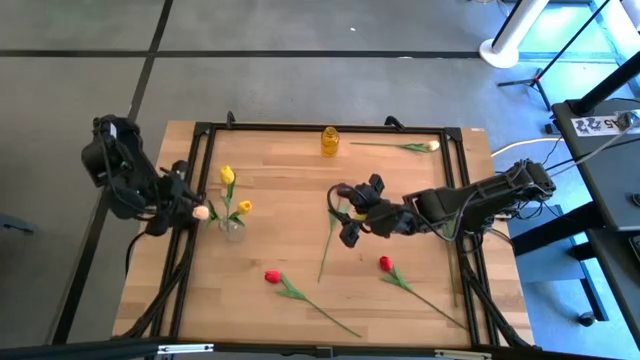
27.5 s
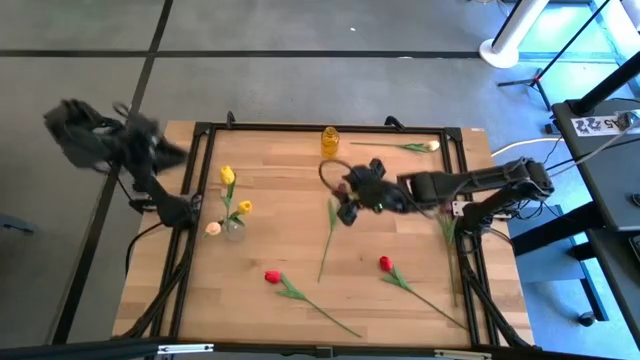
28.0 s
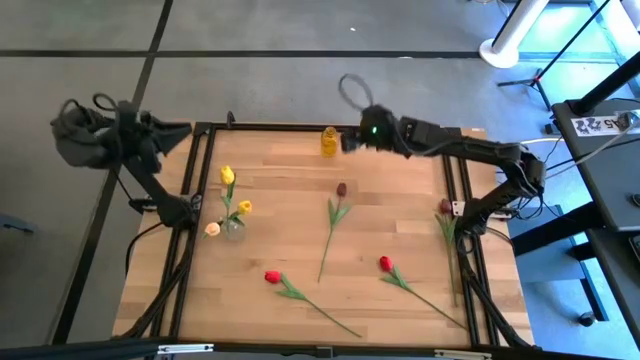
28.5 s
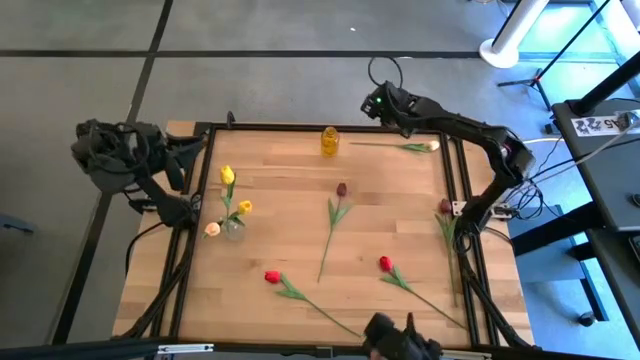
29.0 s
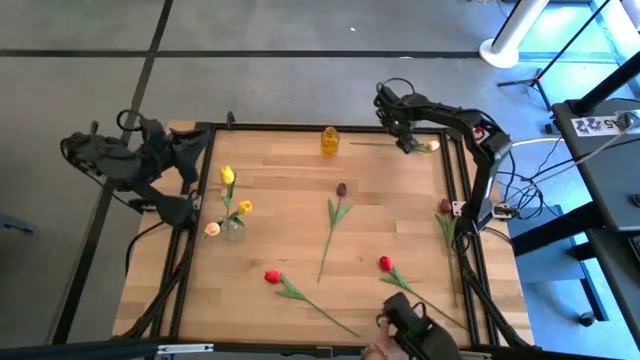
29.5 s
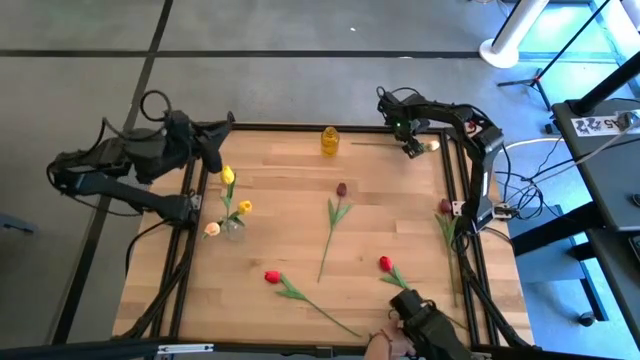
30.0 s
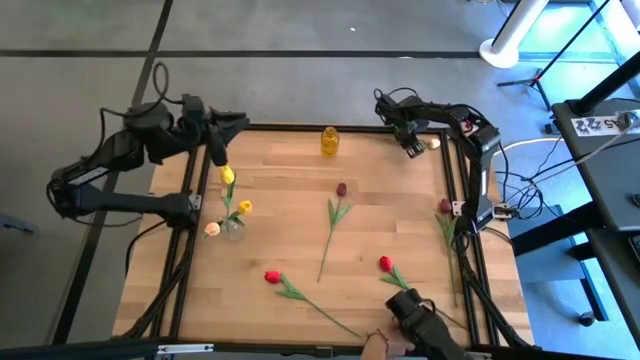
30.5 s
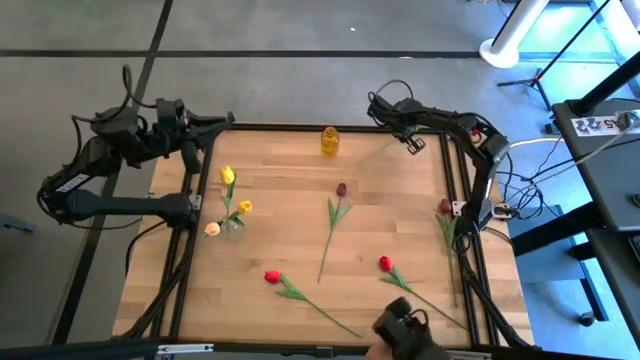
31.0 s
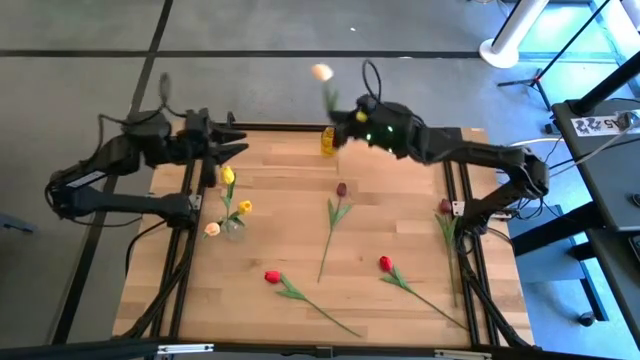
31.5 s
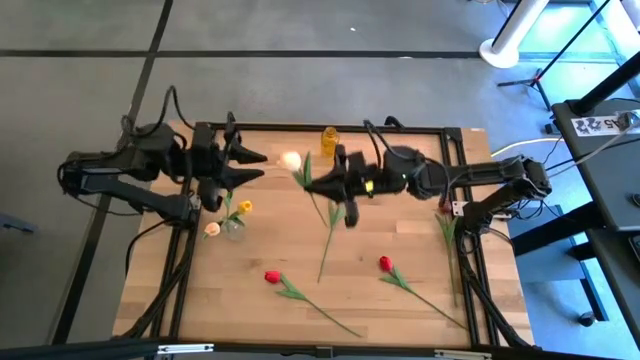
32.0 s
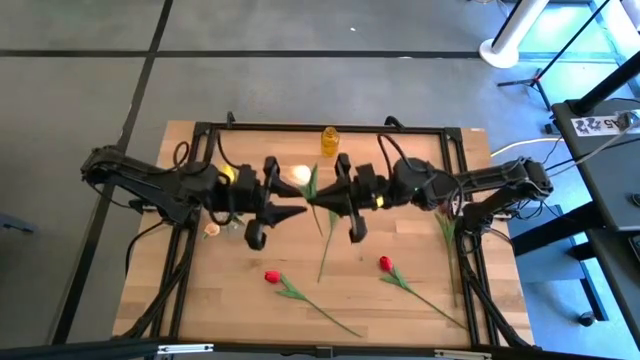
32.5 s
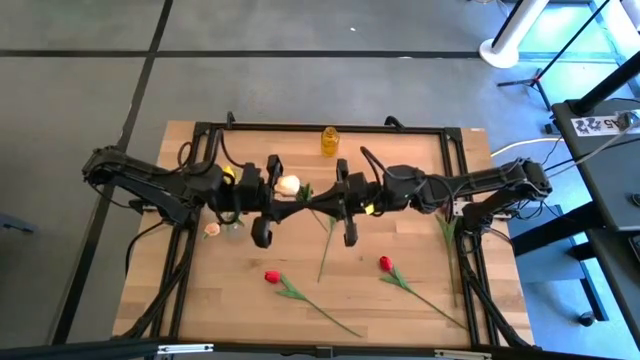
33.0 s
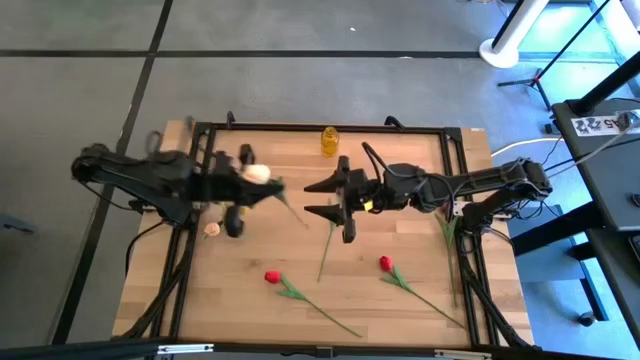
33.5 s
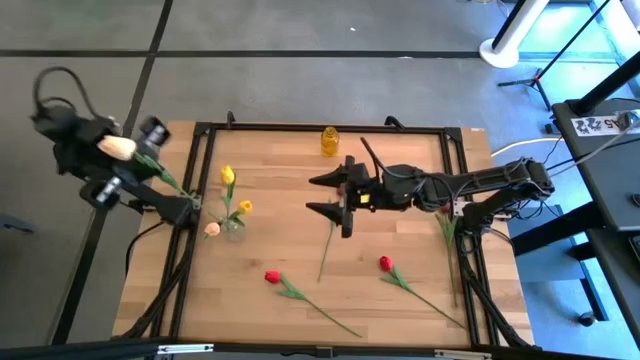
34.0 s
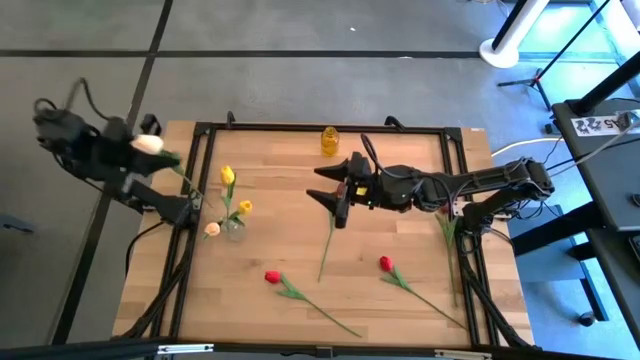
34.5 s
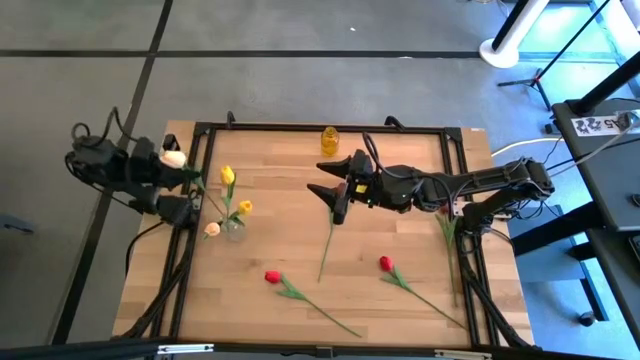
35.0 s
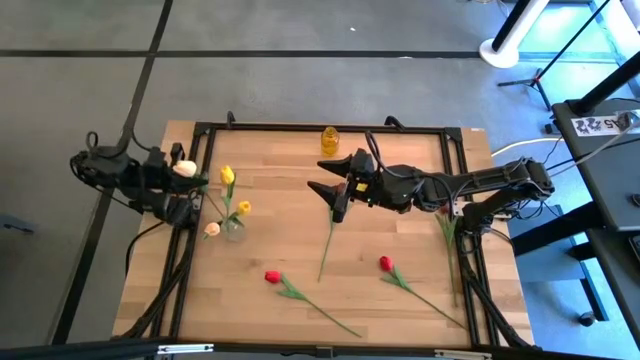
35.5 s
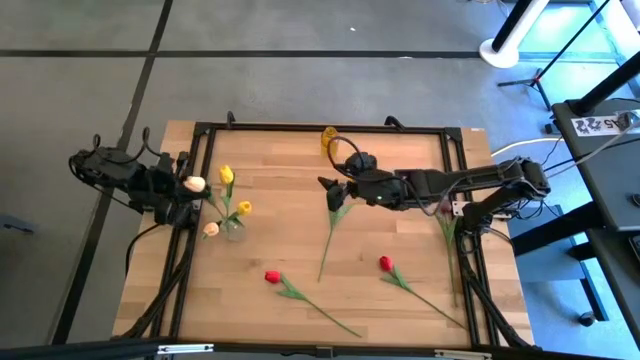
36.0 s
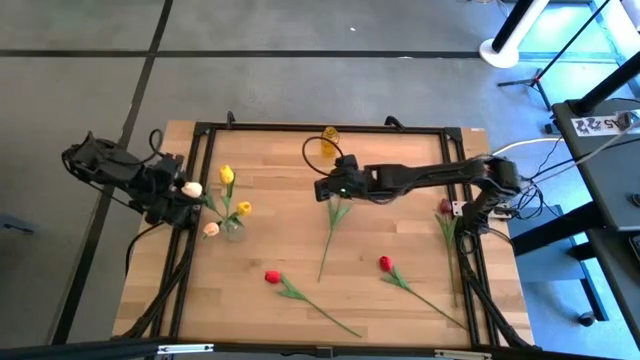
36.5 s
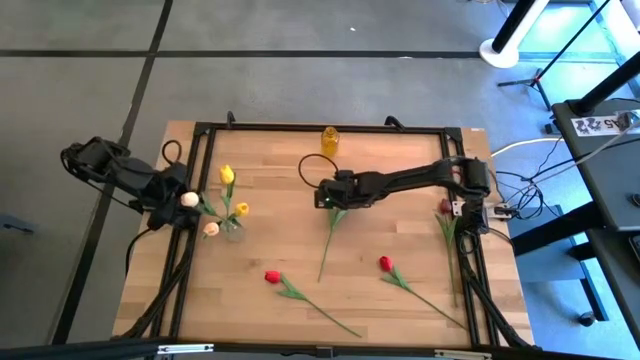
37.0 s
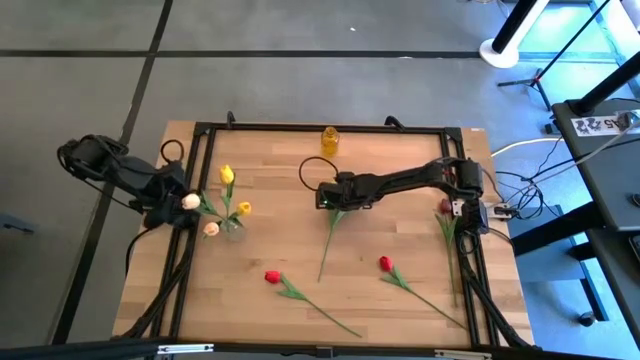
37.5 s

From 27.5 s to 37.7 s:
Task: Sort flowers into vase by color
Put the white flower into the transparent vase

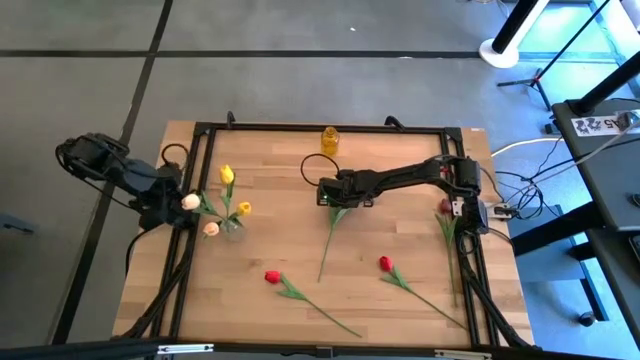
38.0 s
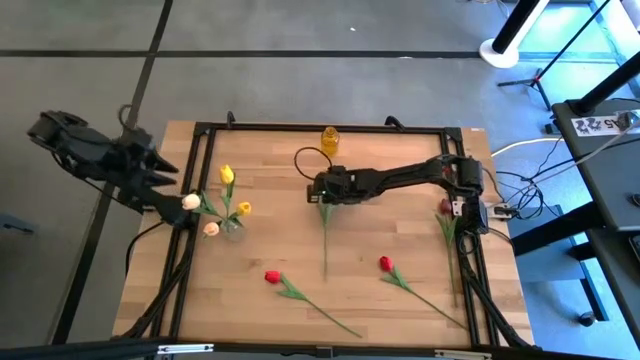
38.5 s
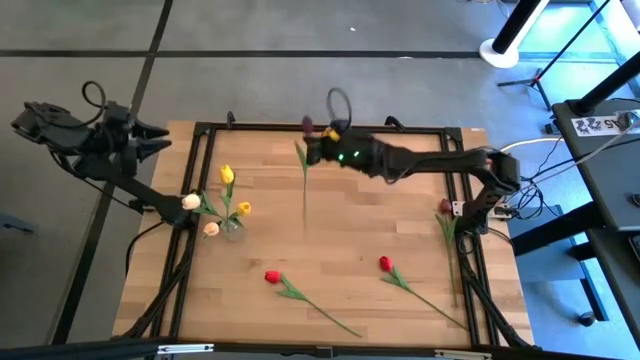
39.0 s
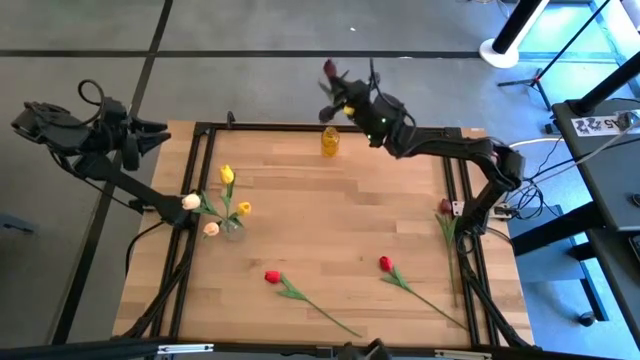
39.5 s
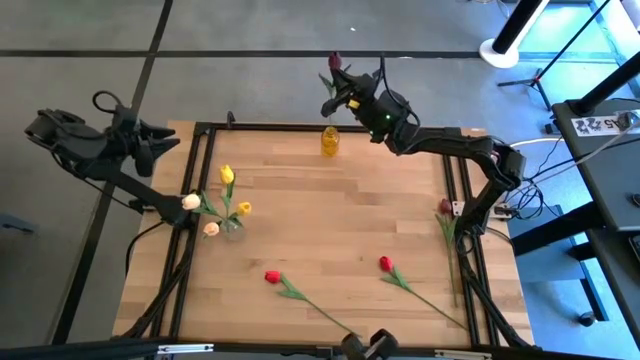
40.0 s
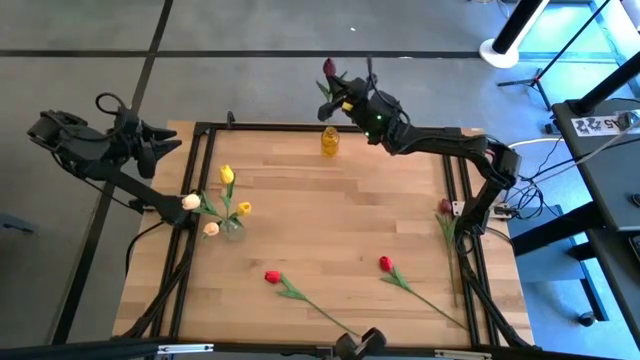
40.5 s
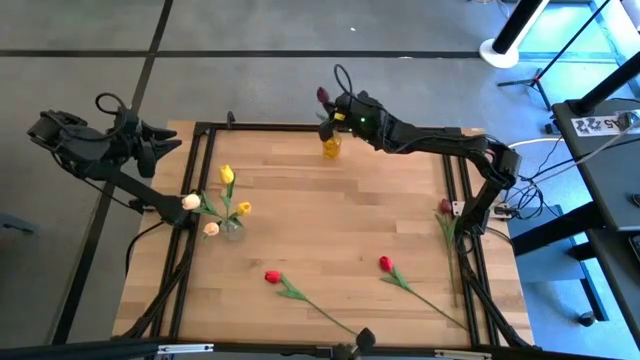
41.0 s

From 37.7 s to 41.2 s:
Put the left dark red flower into the yellow vase

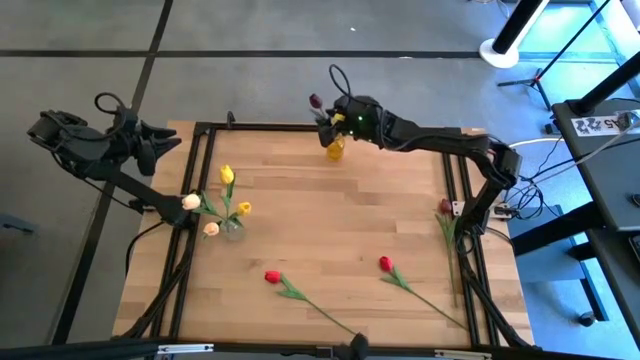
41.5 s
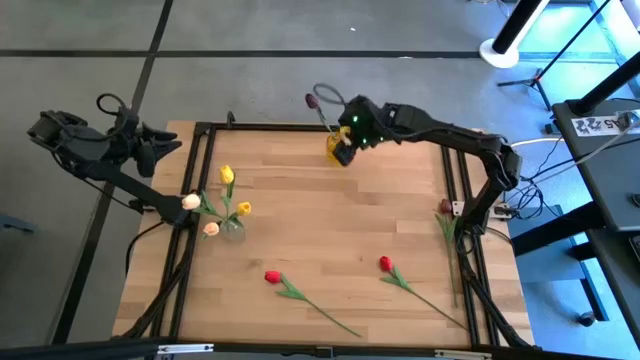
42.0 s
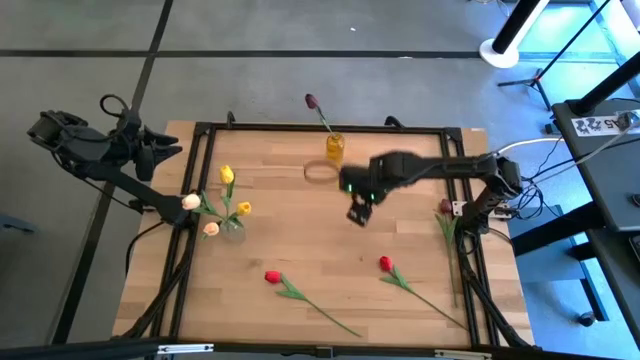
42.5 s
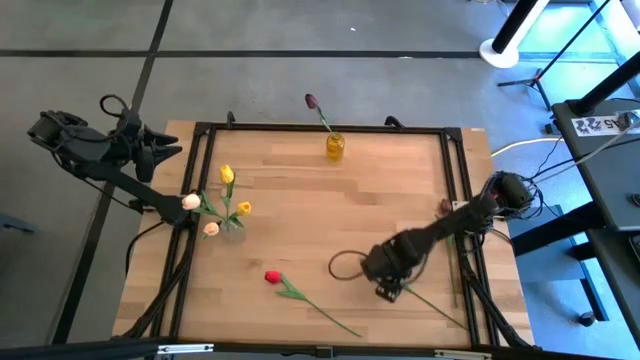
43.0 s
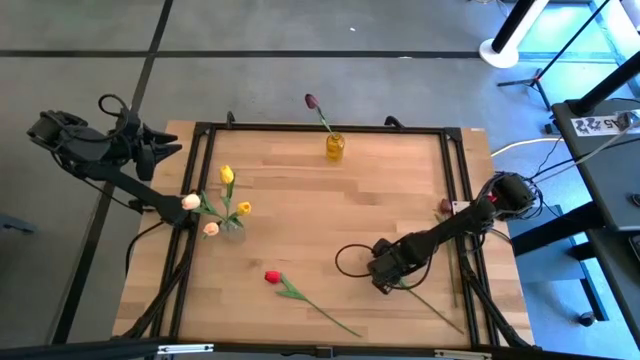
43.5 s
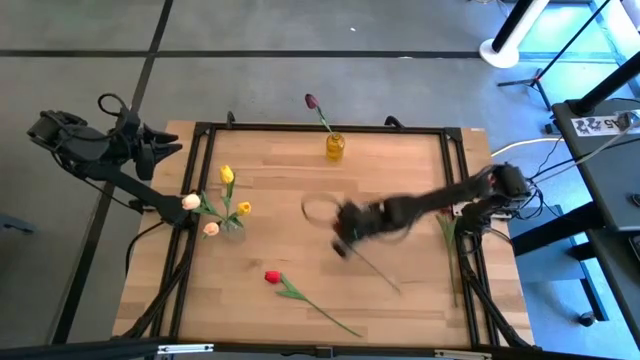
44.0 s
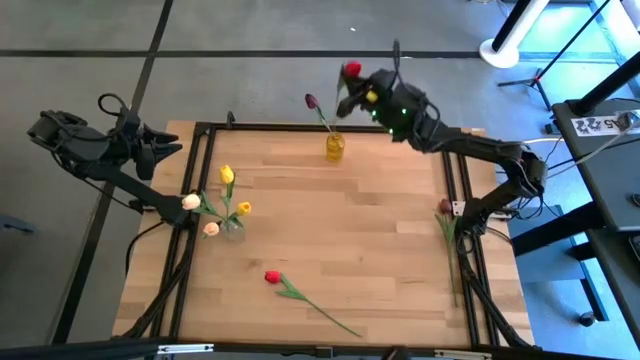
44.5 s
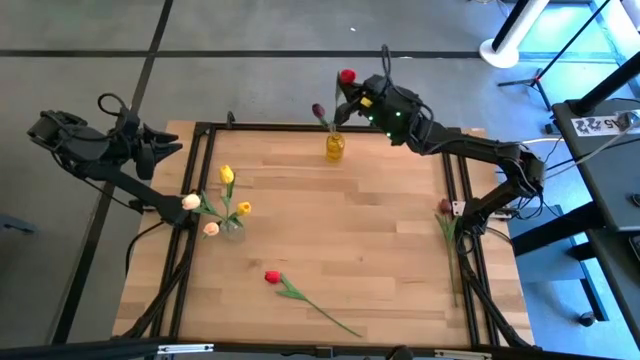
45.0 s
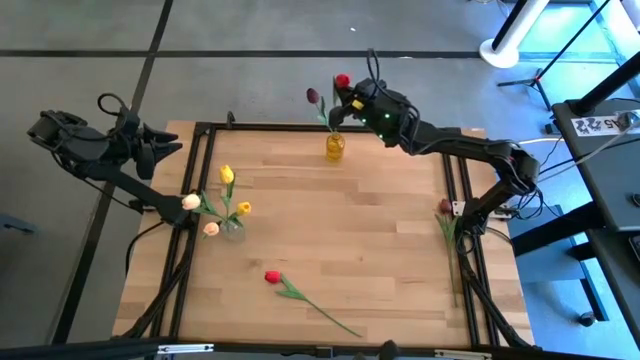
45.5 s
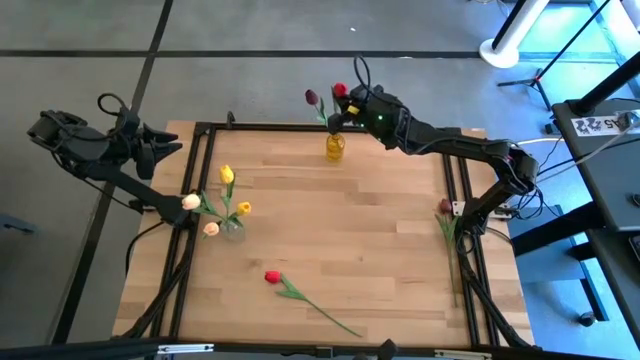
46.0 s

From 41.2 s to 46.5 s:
Put the right red flower into the yellow vase

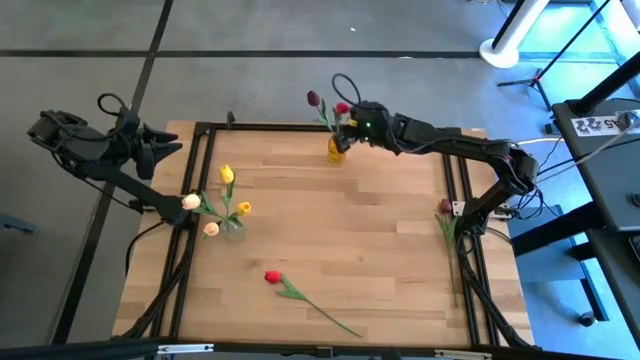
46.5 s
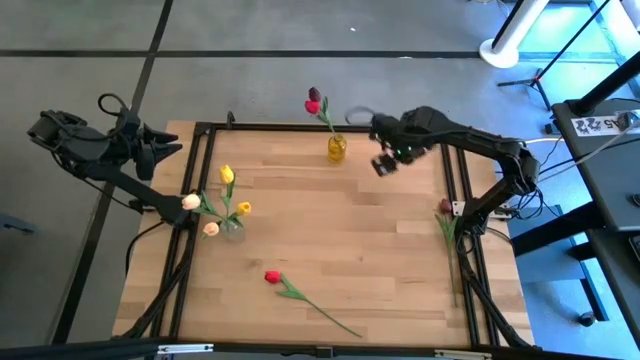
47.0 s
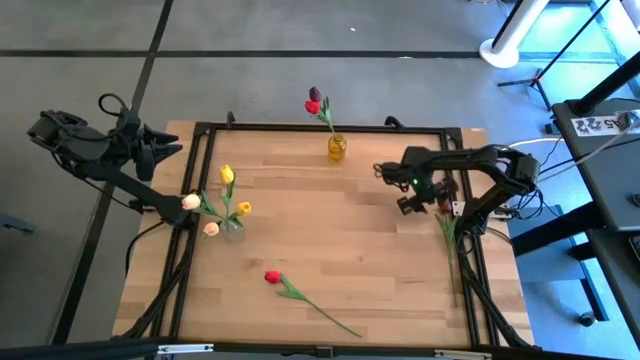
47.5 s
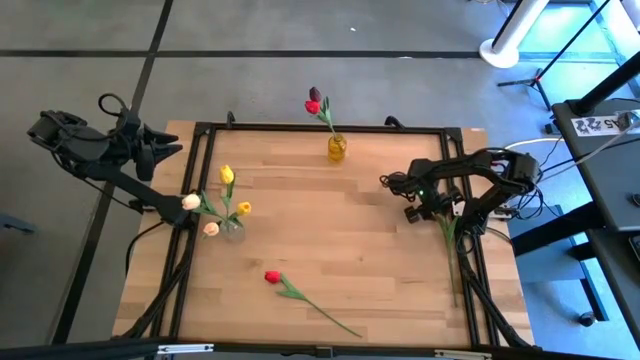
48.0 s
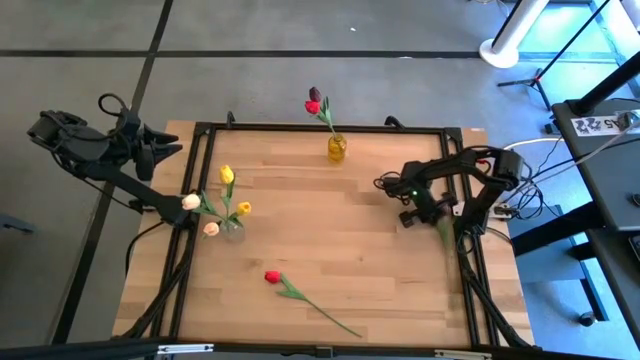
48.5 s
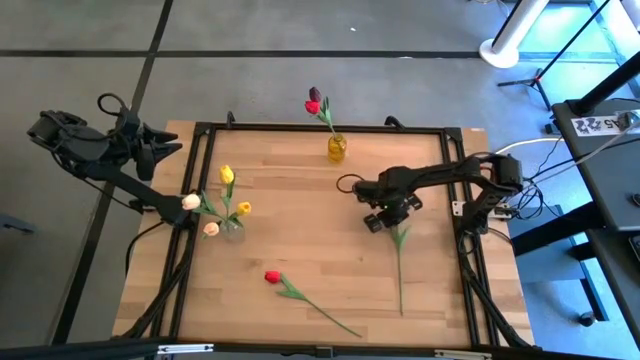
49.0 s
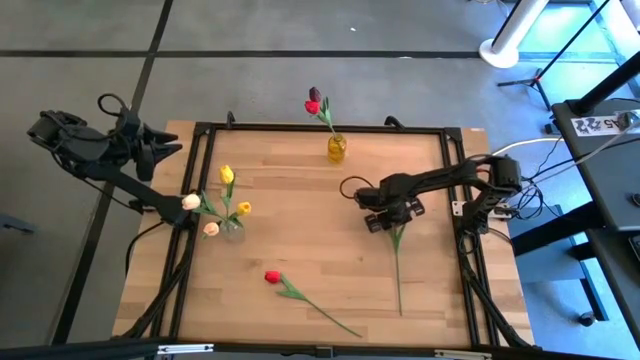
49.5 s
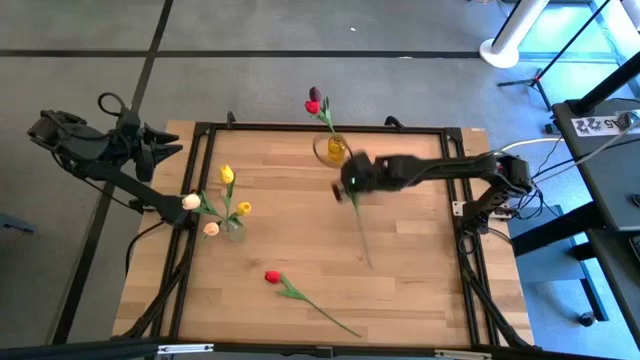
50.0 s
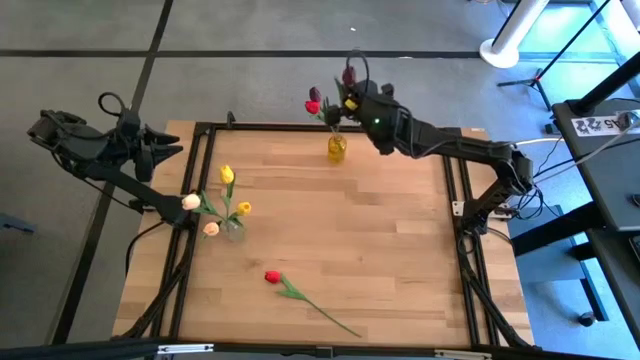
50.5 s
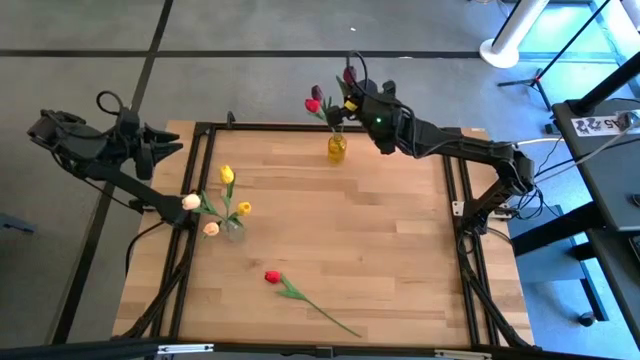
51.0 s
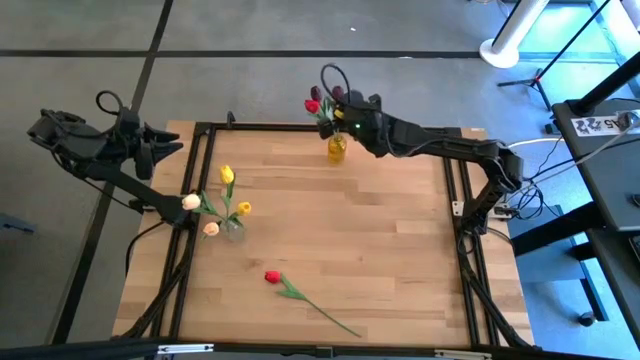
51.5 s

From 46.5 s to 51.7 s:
Put the dark red flower into the yellow vase
